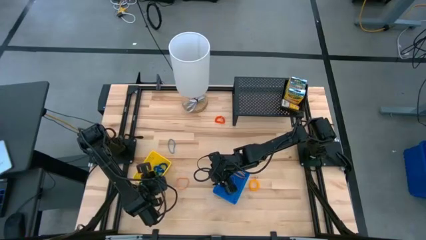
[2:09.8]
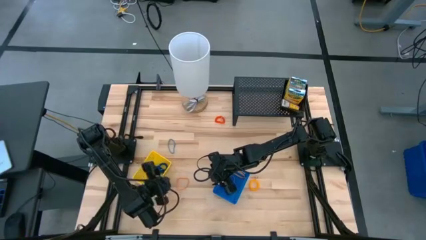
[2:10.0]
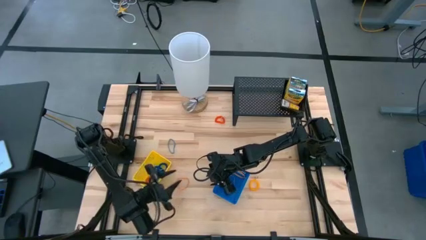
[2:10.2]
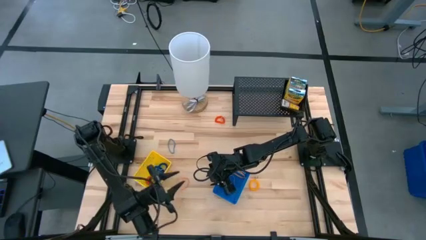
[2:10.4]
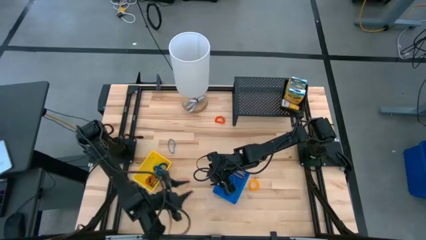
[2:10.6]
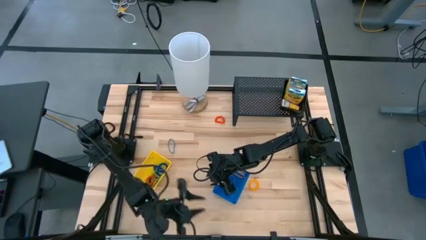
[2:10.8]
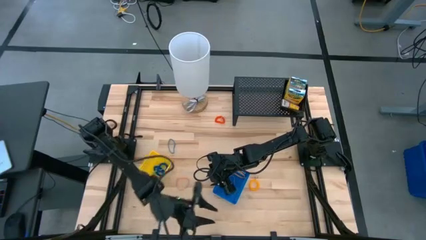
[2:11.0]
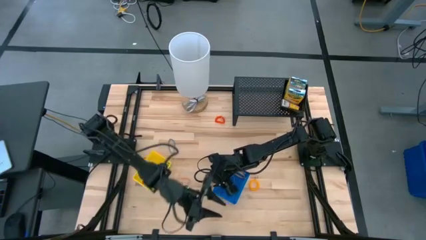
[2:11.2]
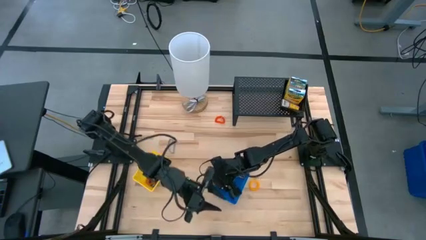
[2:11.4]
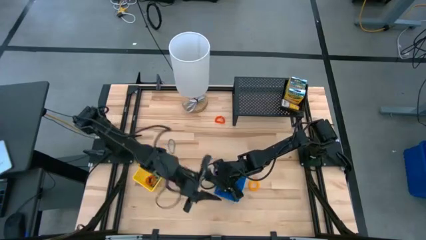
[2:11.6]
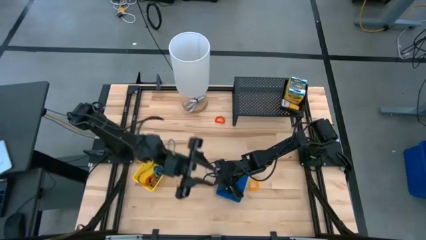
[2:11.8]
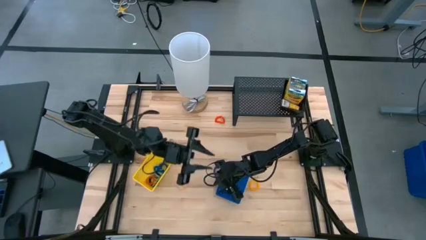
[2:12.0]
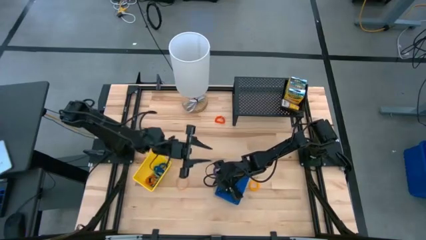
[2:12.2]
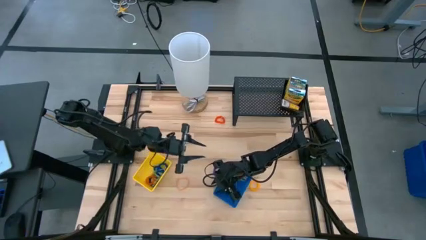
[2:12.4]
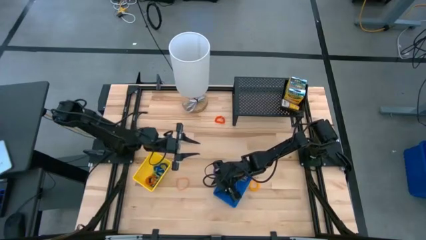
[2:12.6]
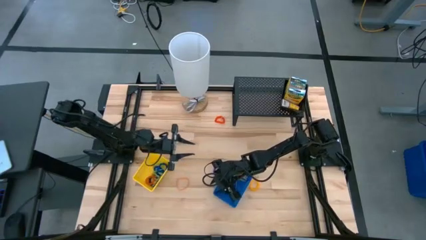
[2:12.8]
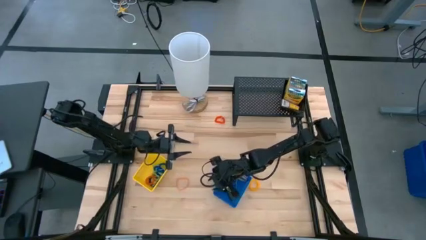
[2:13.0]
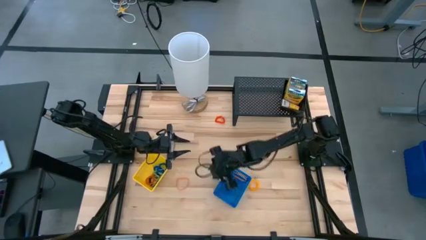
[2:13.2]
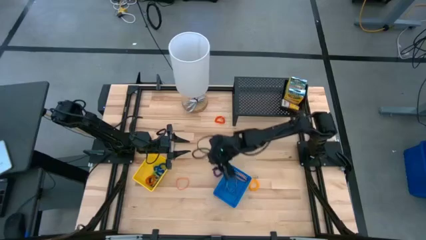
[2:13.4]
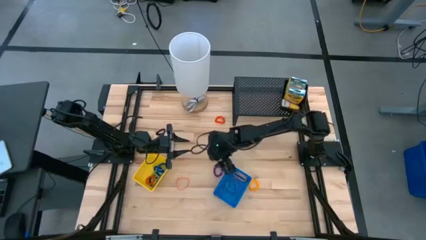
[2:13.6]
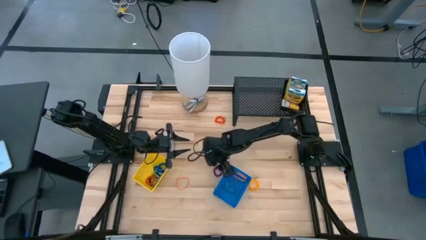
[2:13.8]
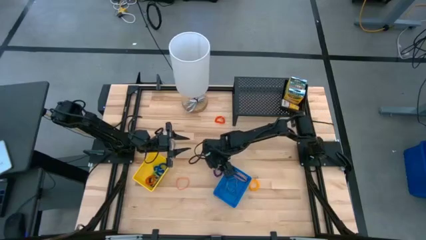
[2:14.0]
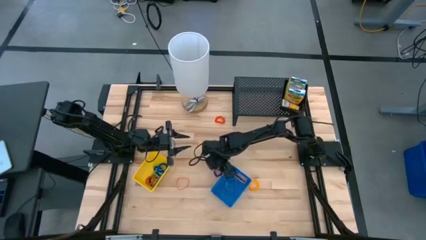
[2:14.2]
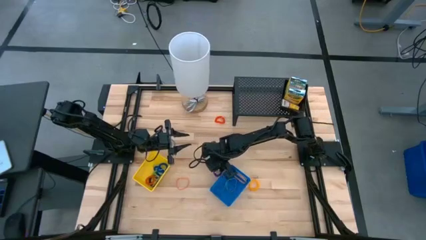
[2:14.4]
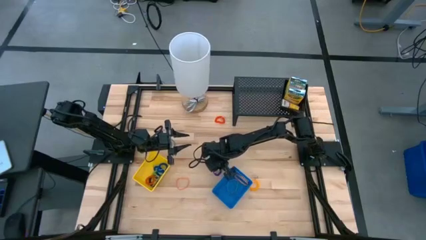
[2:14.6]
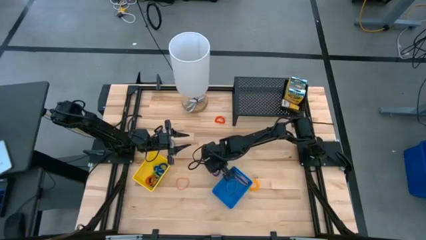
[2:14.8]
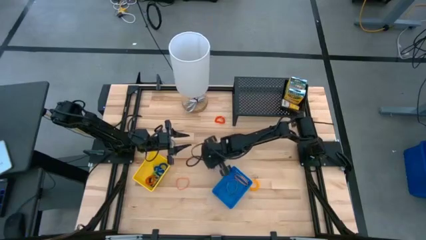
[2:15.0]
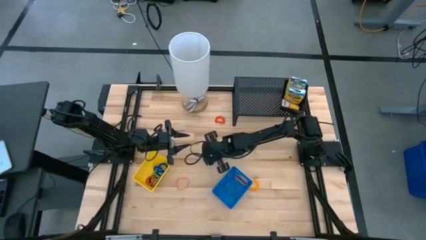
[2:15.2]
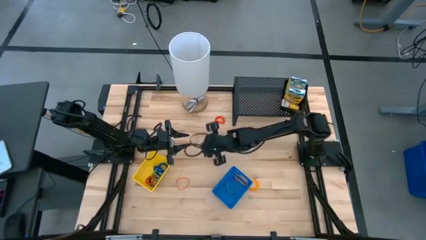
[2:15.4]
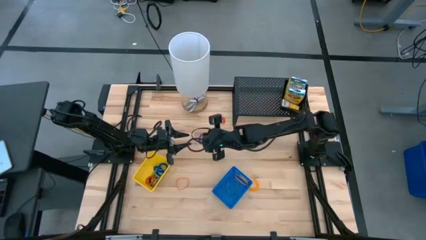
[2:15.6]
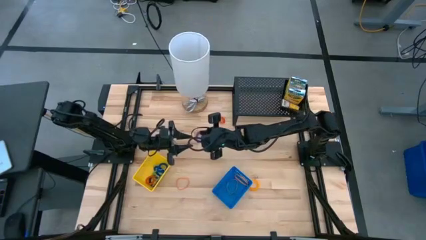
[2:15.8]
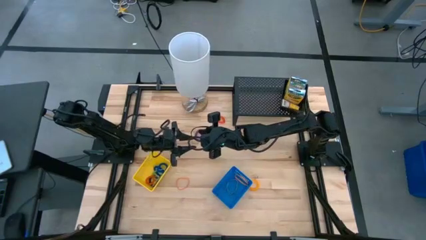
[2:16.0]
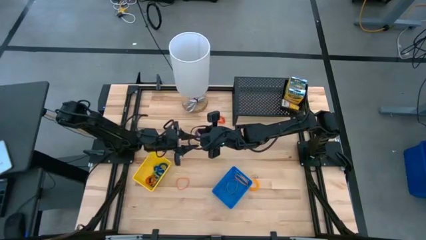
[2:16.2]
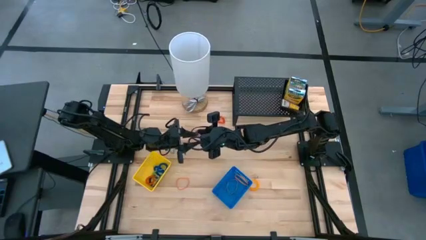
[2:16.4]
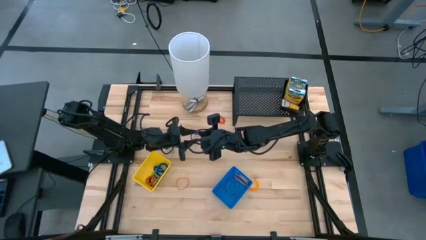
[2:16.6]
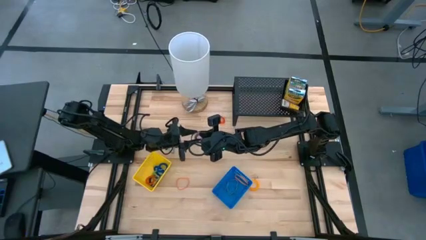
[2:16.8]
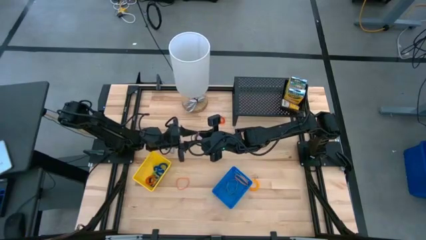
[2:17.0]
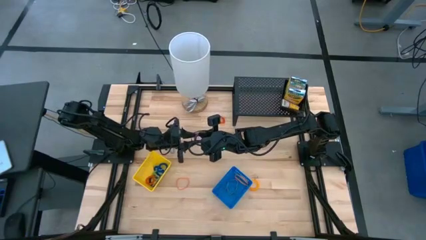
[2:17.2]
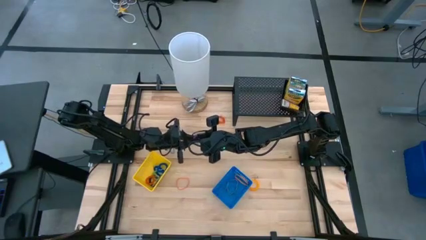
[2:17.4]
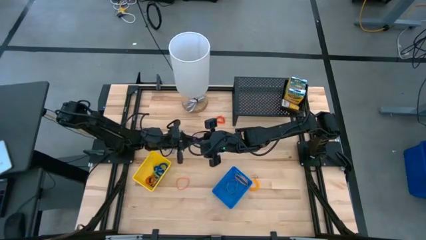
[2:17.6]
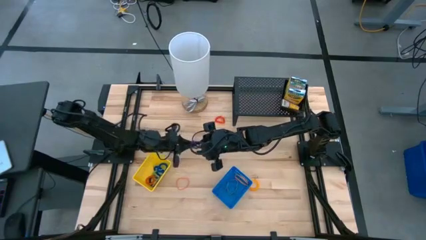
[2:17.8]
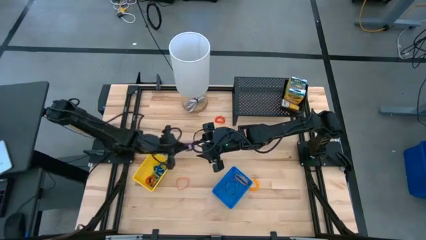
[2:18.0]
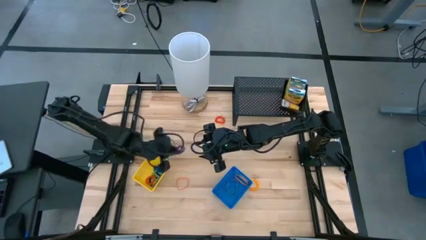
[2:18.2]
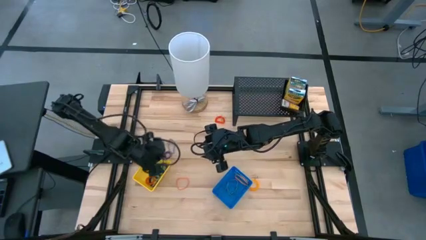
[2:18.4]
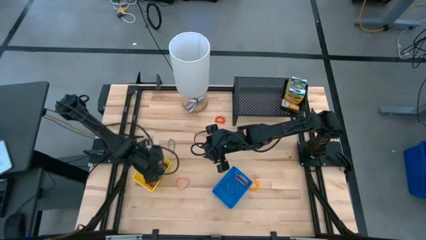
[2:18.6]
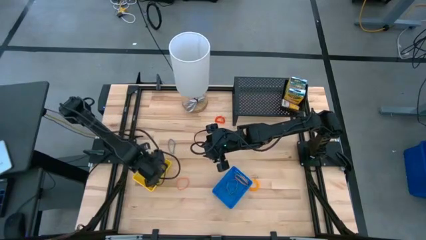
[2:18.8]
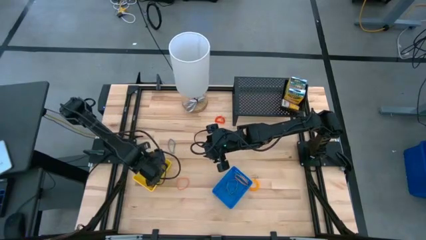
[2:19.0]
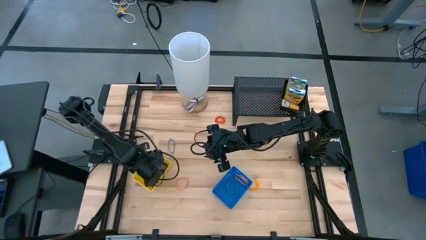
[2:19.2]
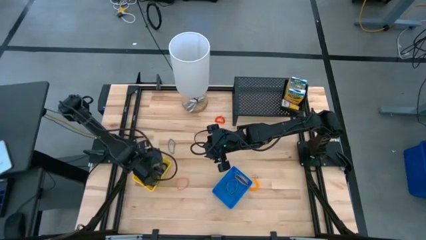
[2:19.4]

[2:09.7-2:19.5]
Task: Pick & Place Office Desk Supplies
Put the purple spring keychain into the yellow bin

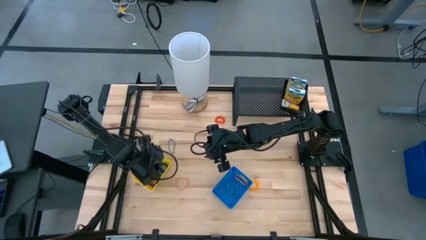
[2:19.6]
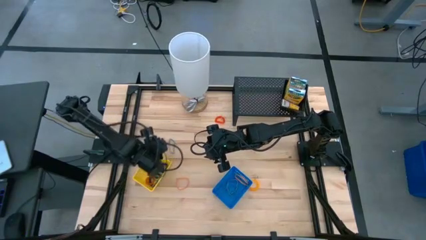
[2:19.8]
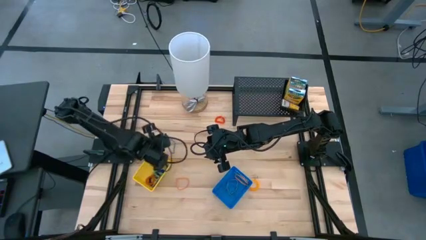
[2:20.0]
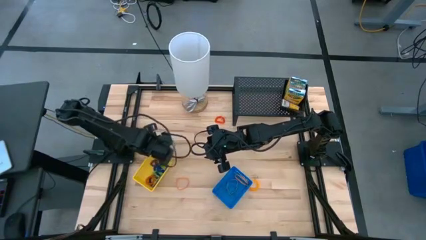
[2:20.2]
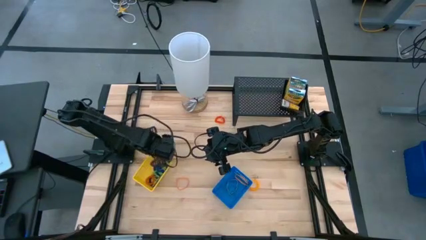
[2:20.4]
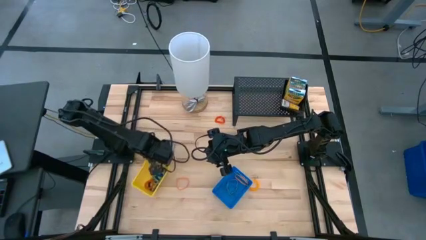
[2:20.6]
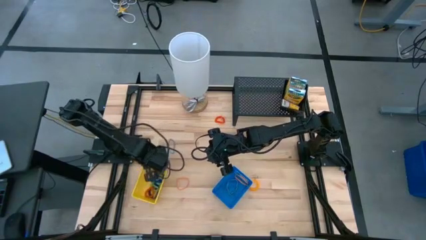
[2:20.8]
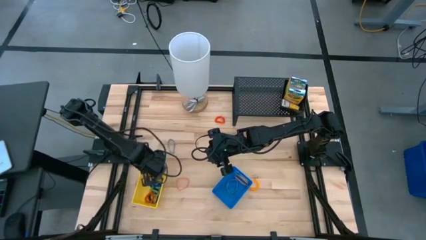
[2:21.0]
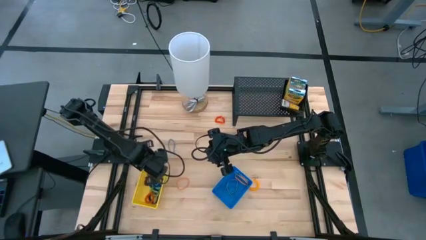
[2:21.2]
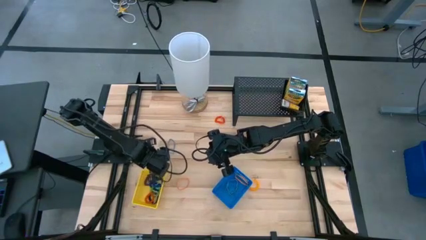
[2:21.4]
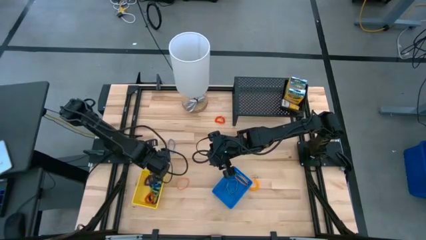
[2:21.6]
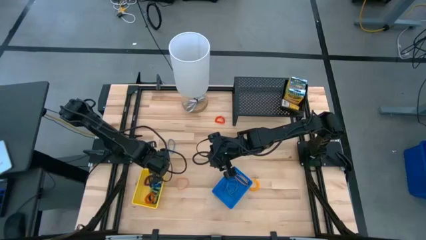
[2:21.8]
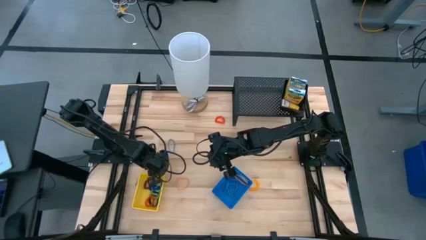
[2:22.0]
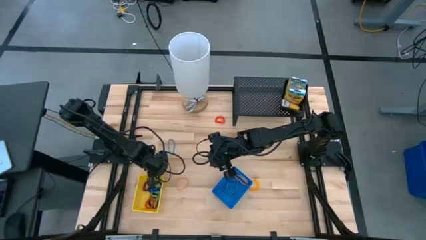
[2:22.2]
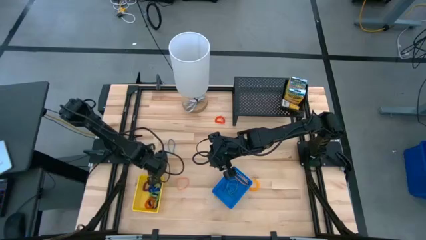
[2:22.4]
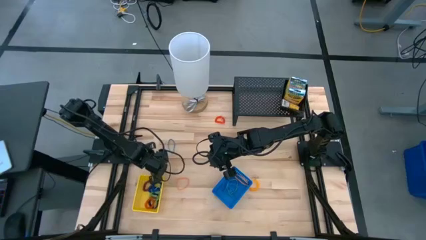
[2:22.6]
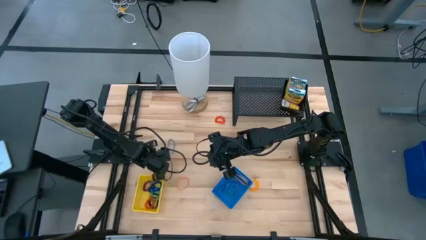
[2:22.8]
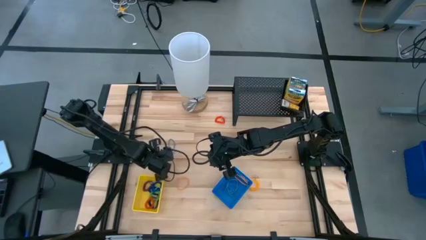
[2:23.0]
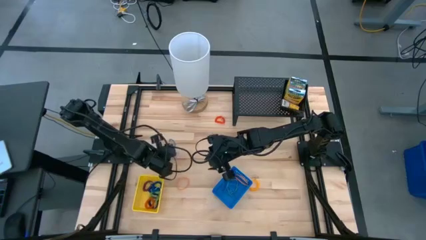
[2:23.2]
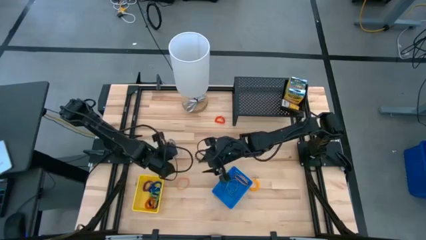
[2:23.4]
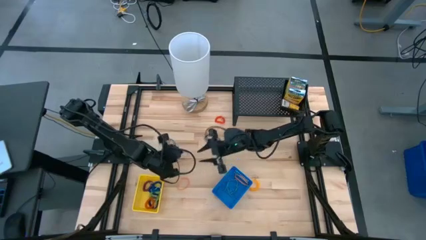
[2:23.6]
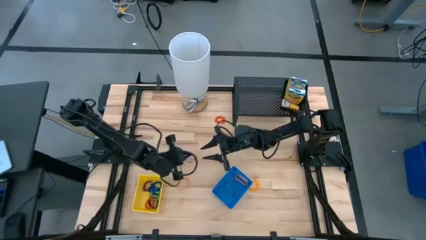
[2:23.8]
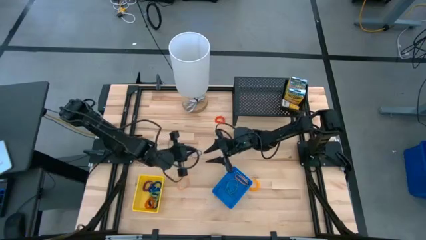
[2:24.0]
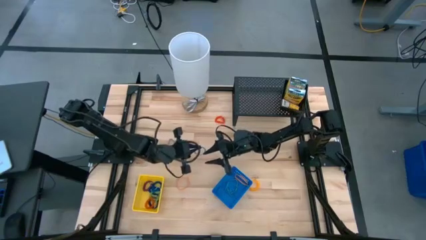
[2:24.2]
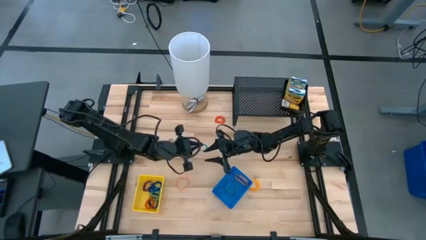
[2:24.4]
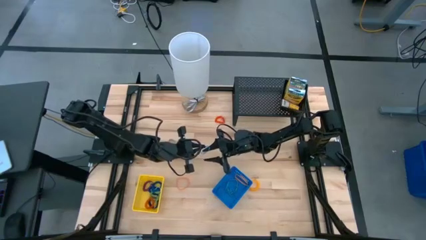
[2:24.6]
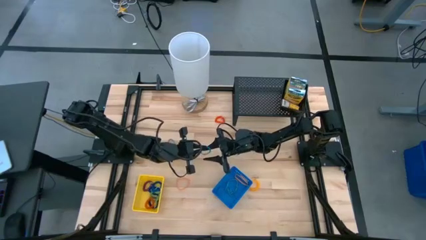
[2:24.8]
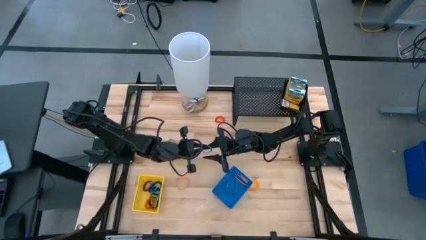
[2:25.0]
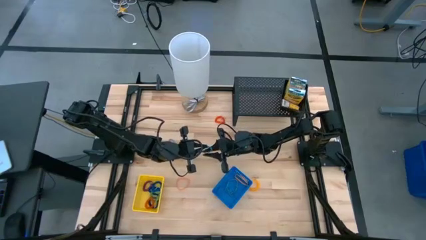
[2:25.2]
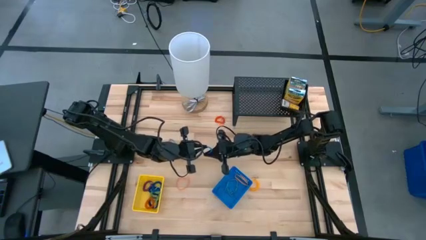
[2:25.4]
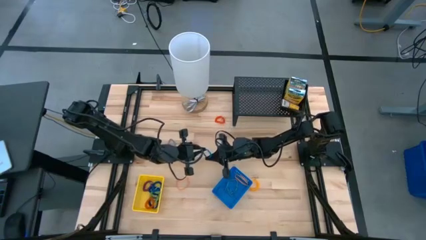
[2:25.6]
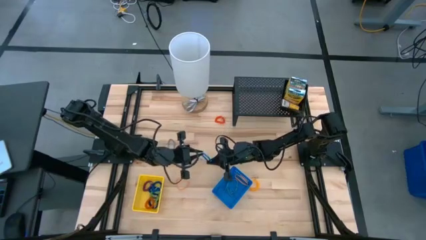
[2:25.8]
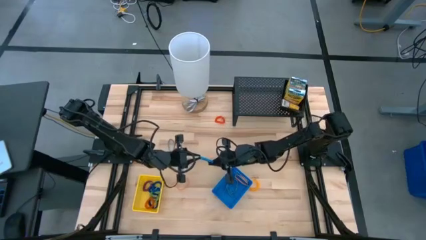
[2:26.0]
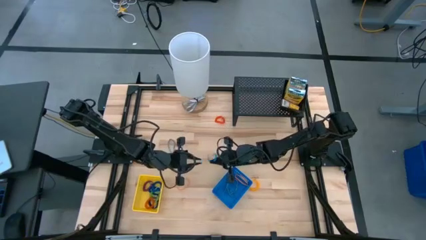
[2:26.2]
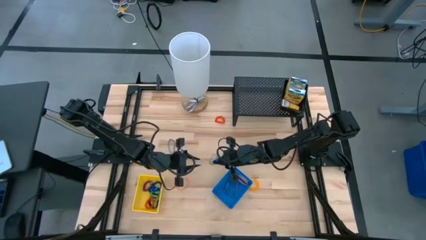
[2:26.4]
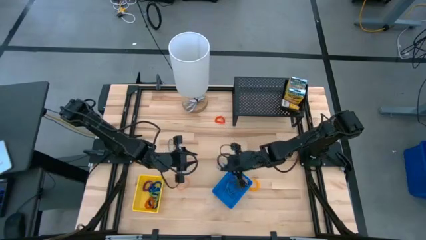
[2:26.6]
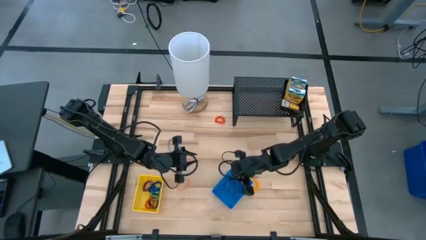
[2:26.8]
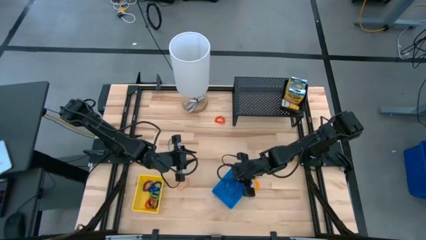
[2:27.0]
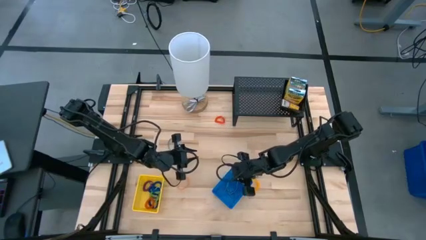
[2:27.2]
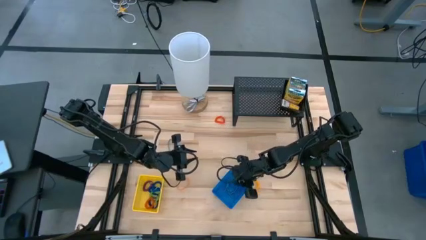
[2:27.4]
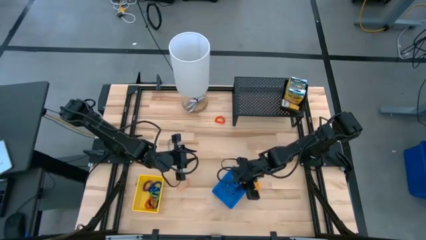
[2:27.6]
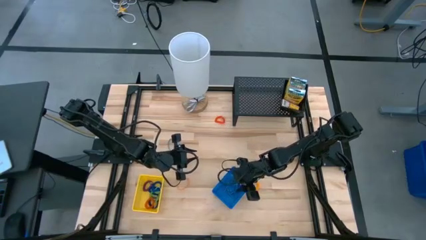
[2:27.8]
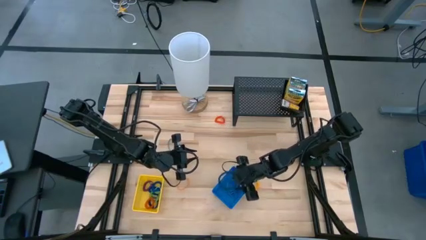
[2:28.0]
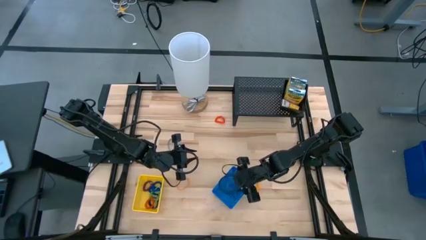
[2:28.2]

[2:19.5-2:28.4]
Put the blue rubber band into the blue bin
